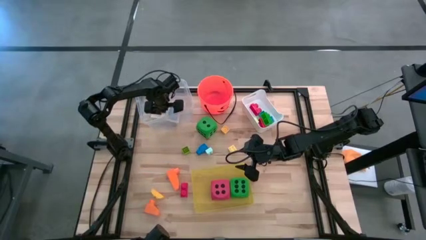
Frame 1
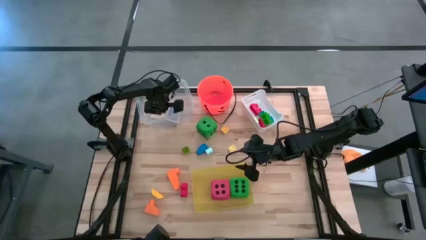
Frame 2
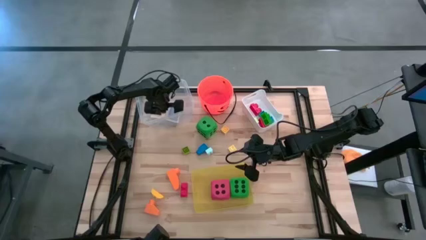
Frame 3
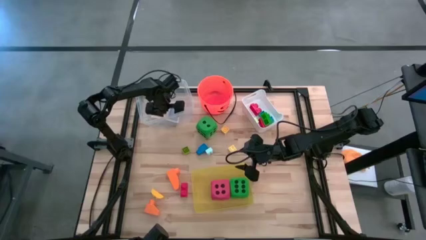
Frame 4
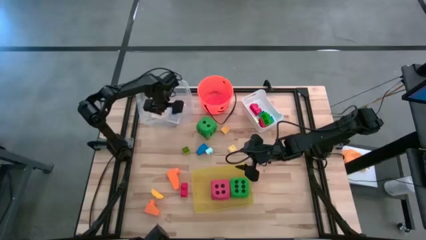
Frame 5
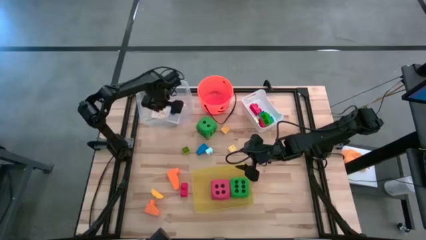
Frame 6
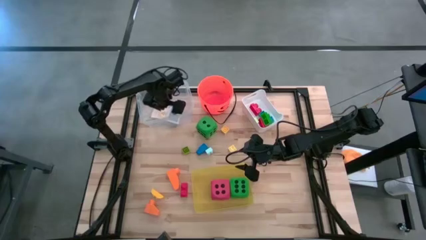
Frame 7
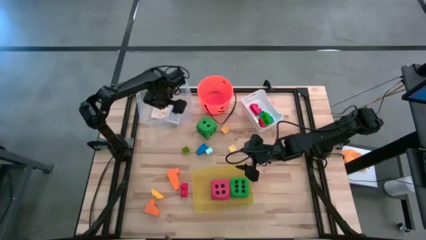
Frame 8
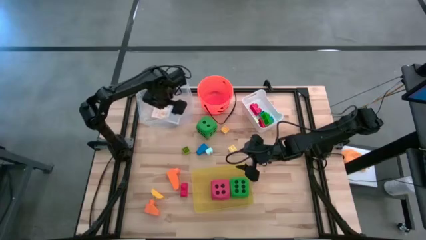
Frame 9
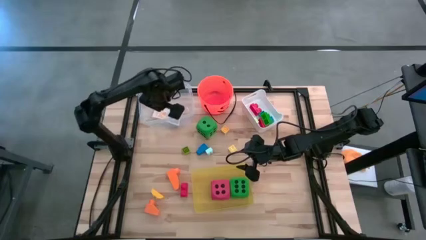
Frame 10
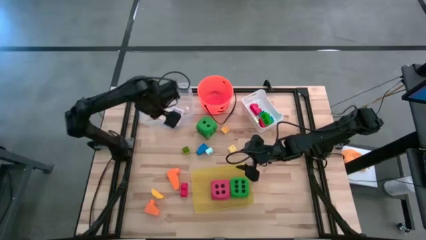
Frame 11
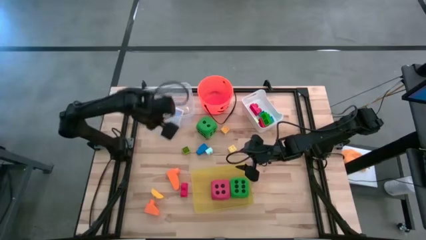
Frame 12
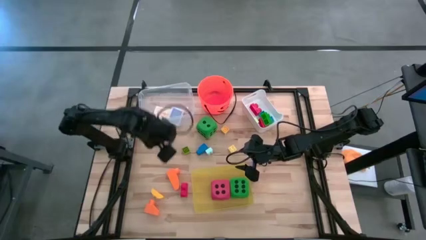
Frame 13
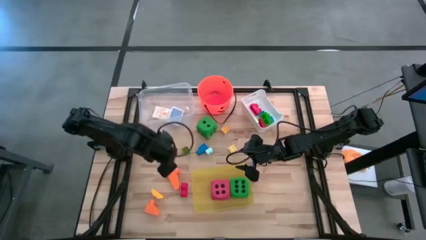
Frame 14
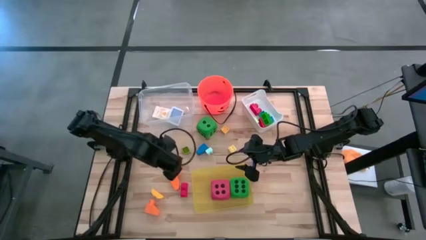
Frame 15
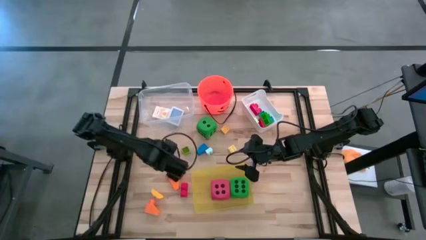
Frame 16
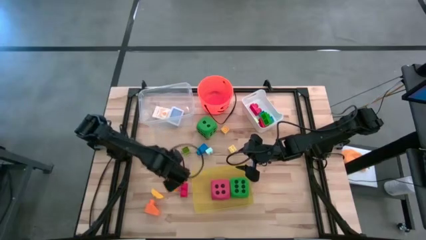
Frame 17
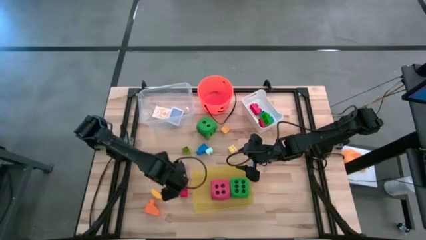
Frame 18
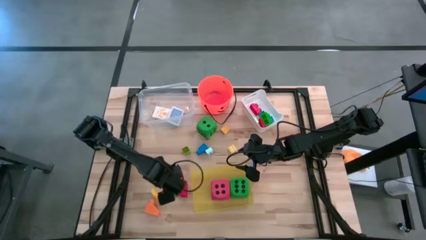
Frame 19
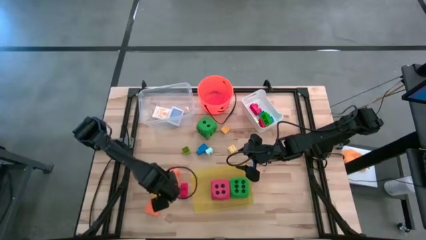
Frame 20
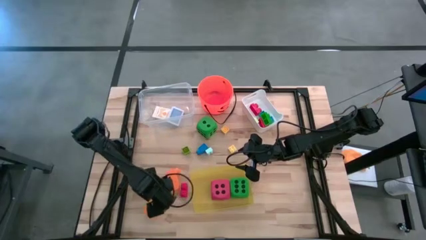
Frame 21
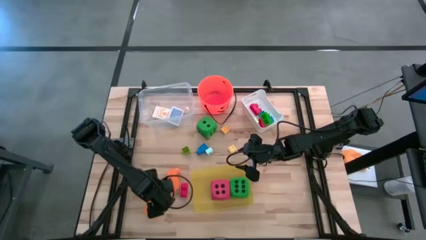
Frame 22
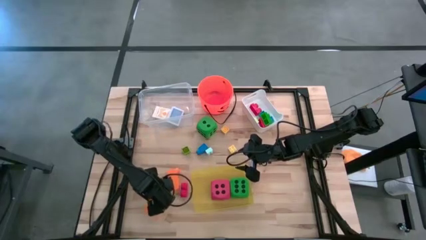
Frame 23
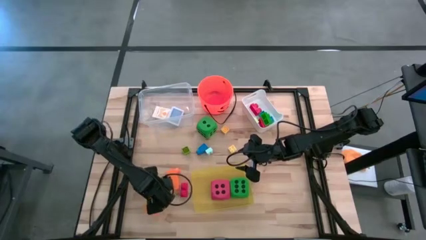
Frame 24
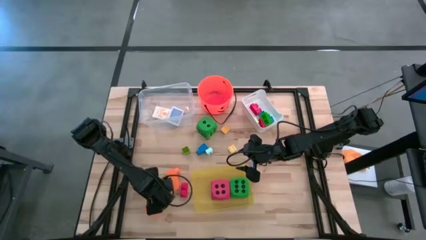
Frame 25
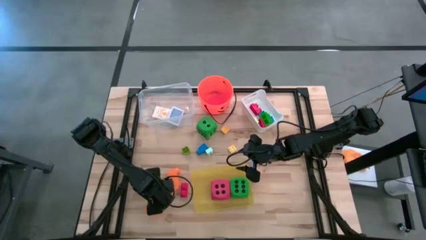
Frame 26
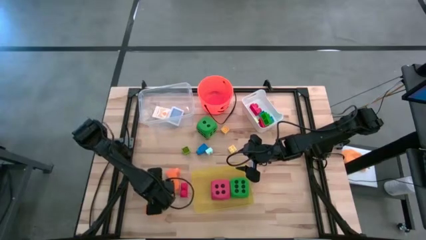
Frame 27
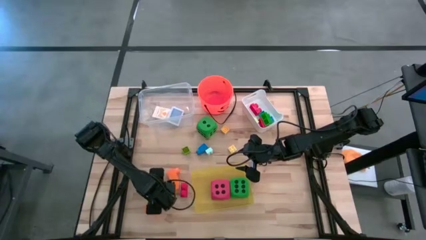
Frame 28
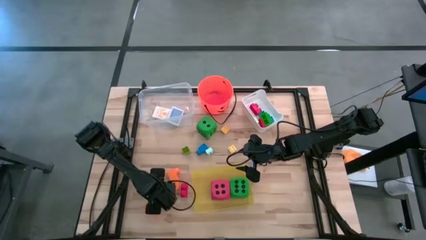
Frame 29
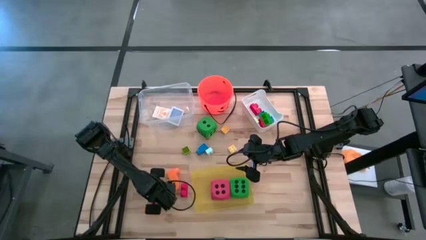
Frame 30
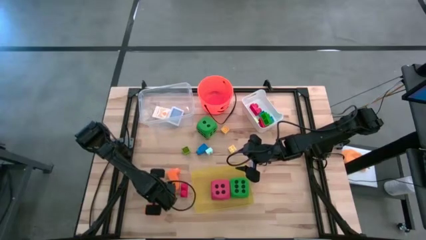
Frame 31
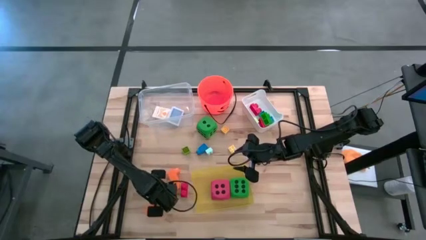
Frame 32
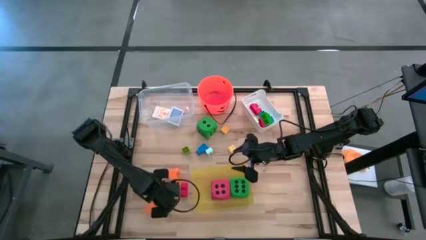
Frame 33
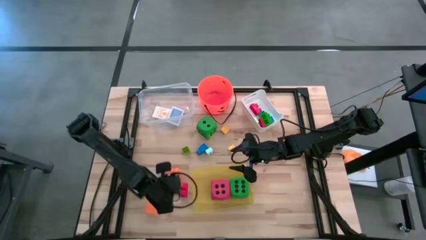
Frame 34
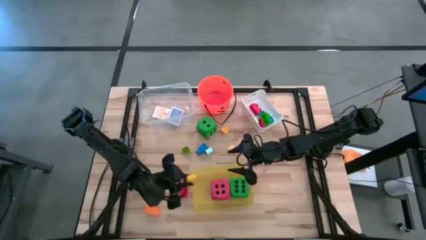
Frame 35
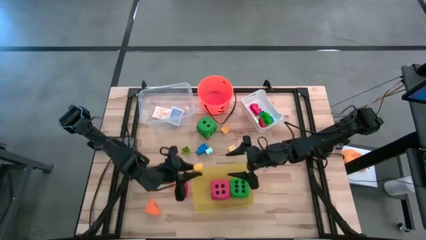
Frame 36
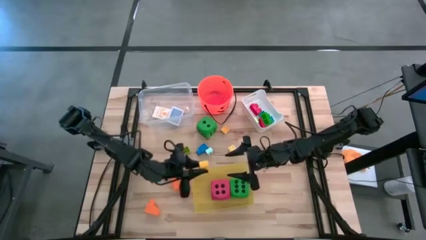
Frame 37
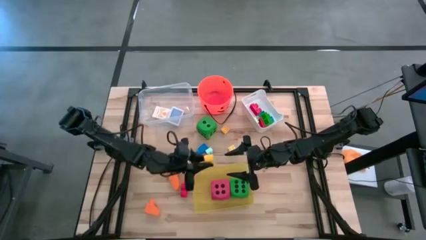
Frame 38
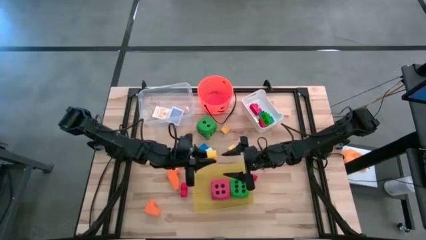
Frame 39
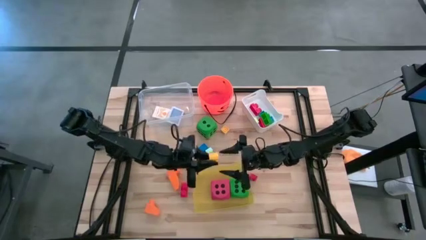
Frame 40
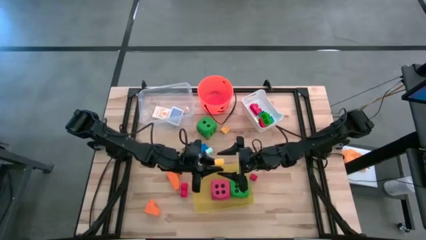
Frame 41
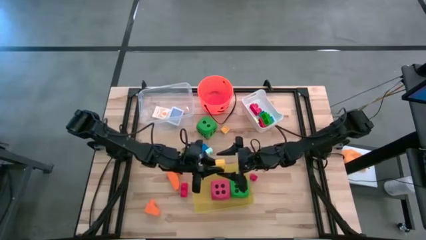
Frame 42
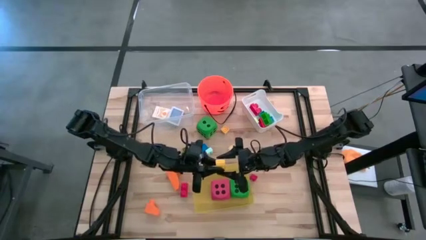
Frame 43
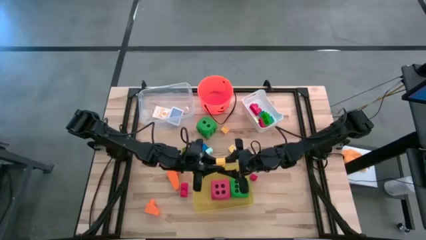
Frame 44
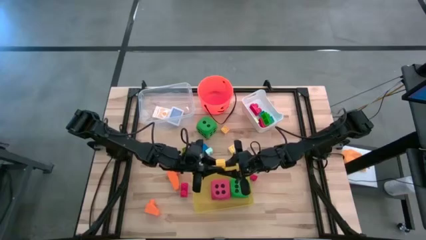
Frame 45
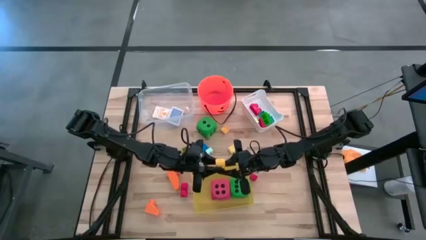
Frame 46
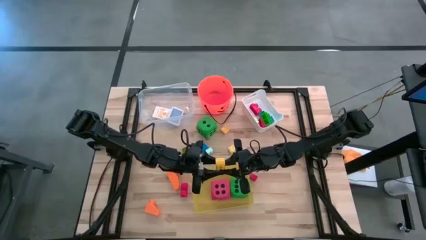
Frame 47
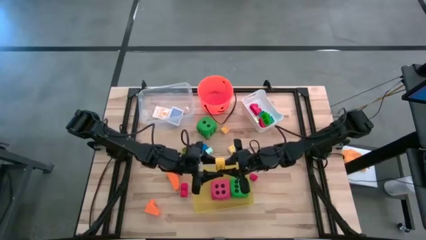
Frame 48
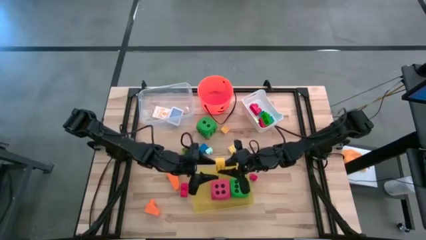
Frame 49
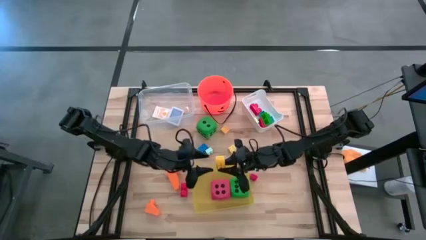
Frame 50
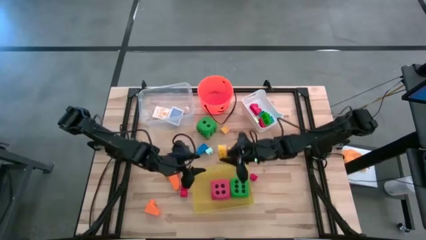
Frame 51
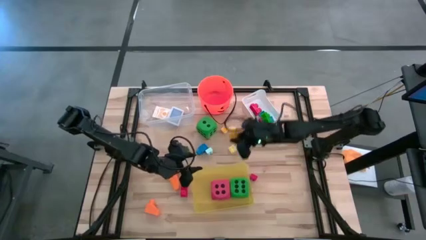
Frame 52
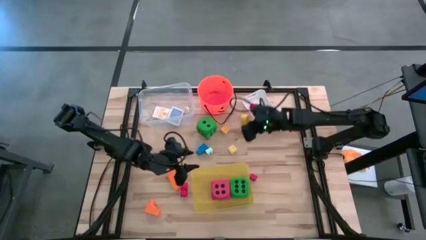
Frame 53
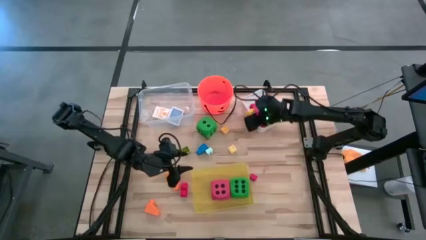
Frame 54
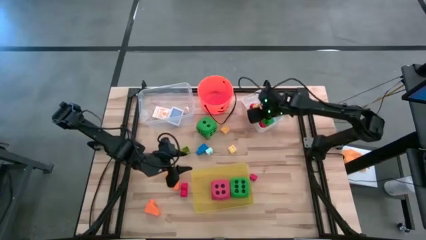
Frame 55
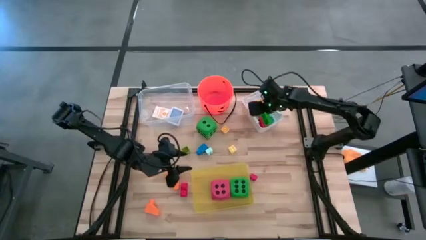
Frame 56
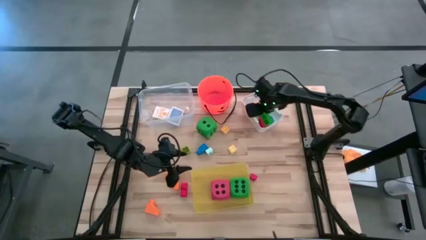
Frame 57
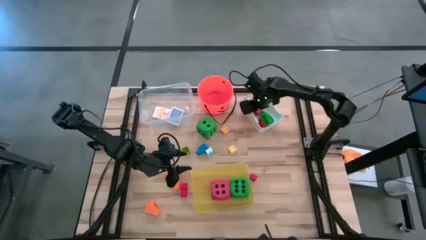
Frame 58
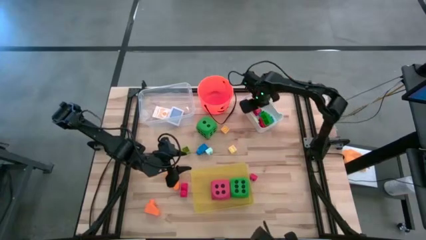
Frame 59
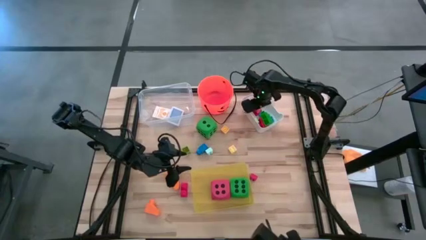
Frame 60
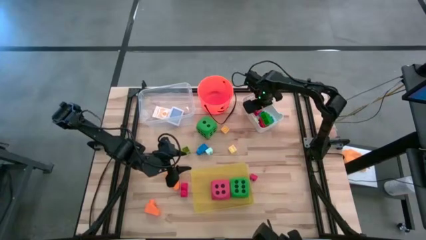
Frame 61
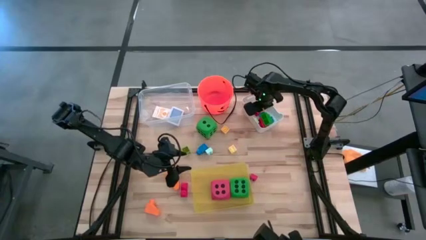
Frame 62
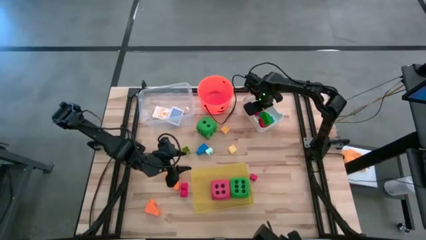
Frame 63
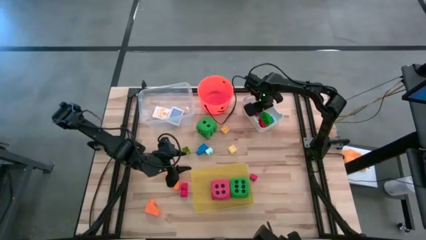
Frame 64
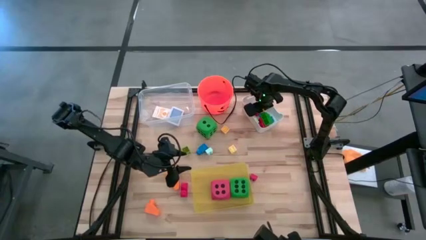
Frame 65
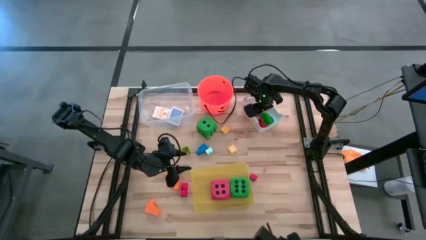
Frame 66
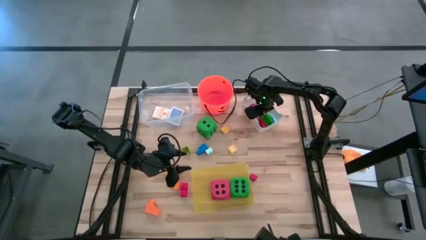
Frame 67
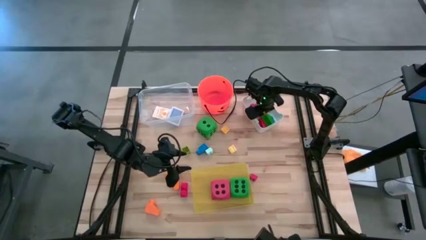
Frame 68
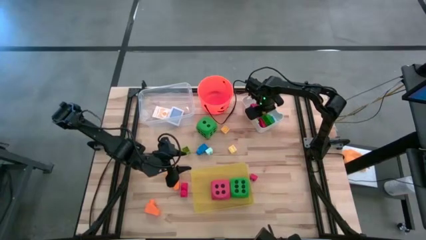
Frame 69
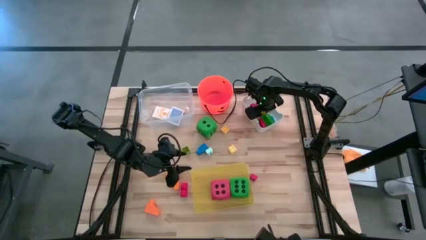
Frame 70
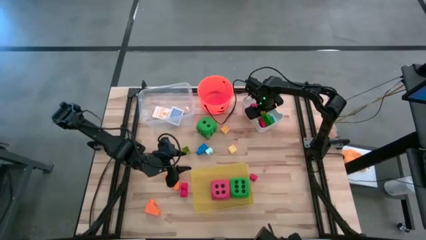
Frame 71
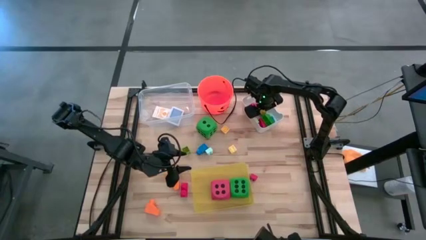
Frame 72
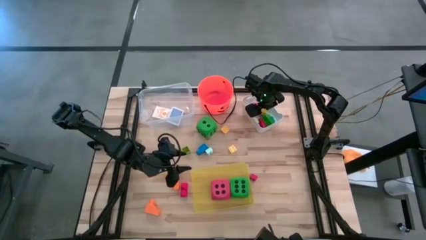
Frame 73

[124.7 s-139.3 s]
Task: Pick & Place Toys
Put the yellow game piece into the white bin

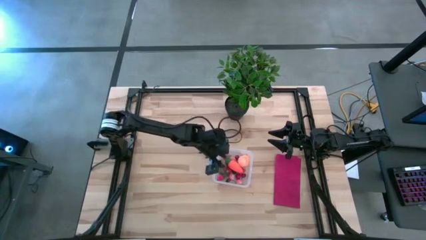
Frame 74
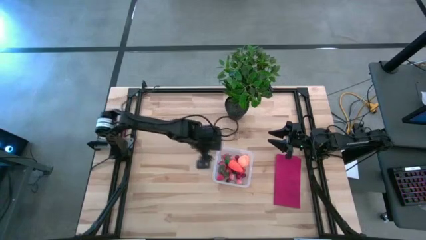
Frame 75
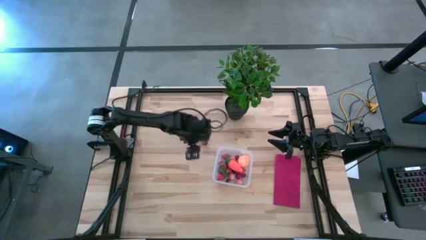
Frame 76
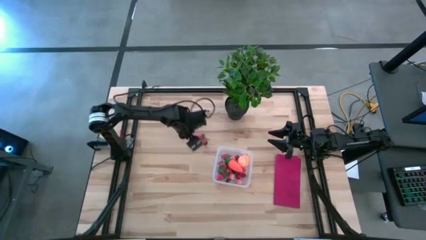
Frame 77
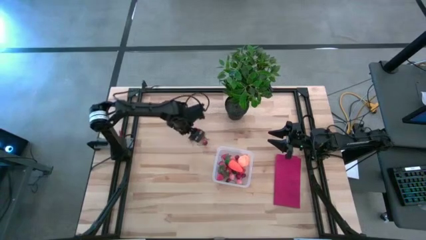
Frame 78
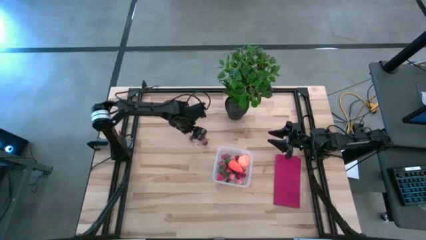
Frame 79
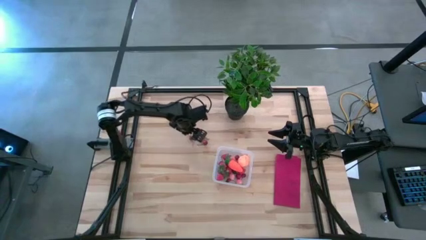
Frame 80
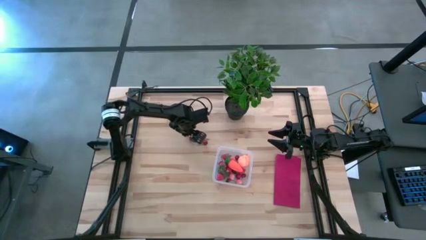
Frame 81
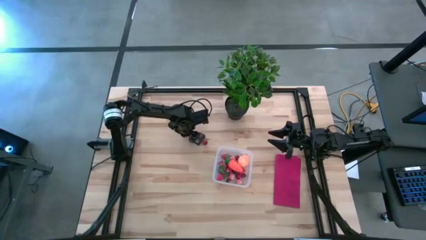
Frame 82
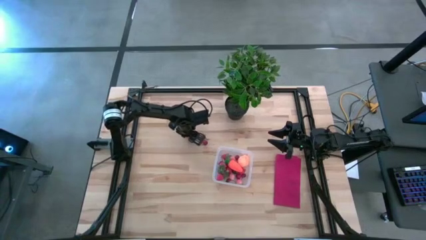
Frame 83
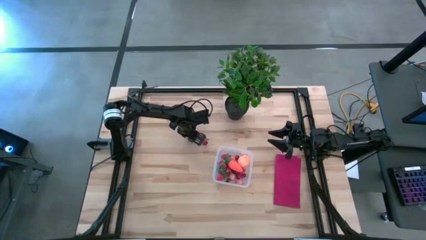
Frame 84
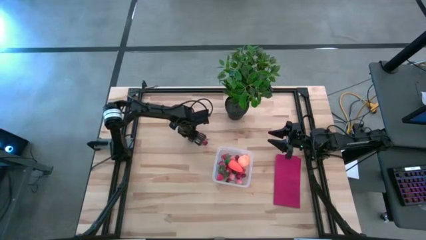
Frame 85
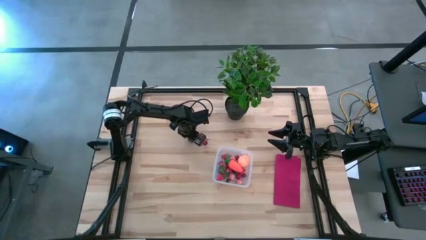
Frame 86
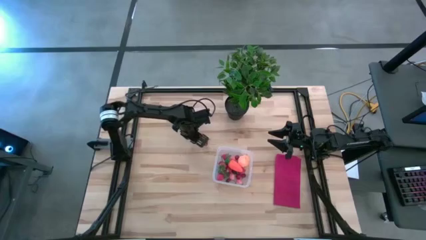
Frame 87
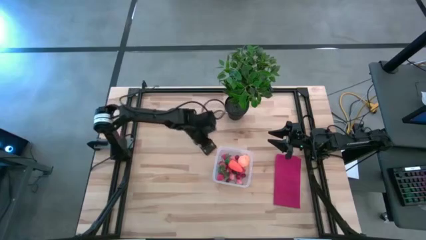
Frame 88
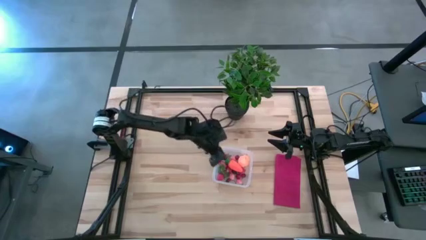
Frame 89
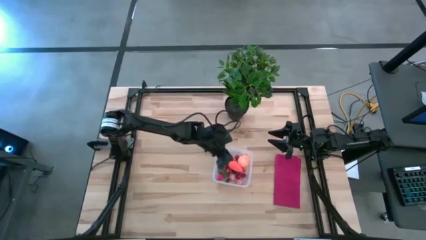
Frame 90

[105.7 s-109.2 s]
Task: Pick and placing Produce into tupperware
Put the red cherry into the transparent bin
